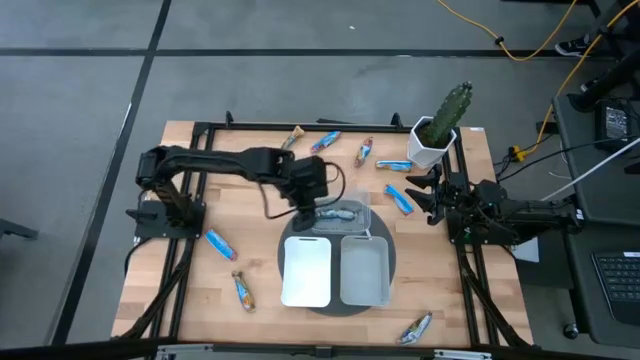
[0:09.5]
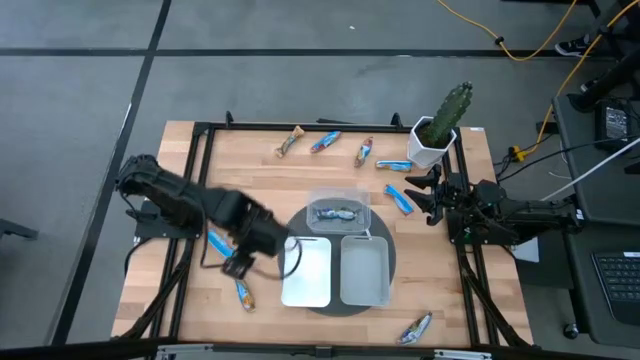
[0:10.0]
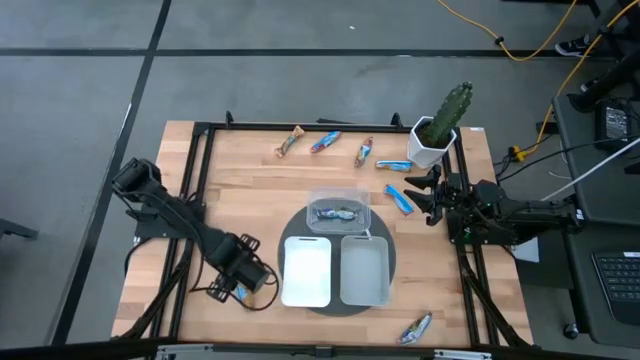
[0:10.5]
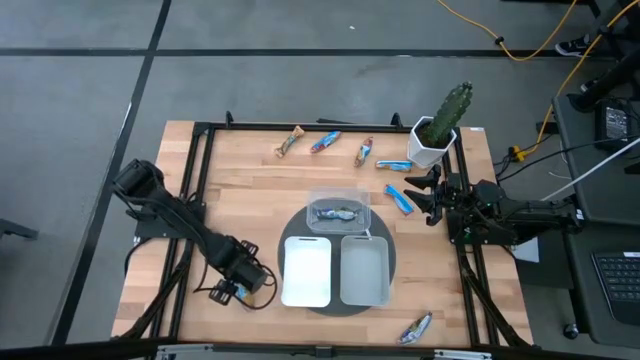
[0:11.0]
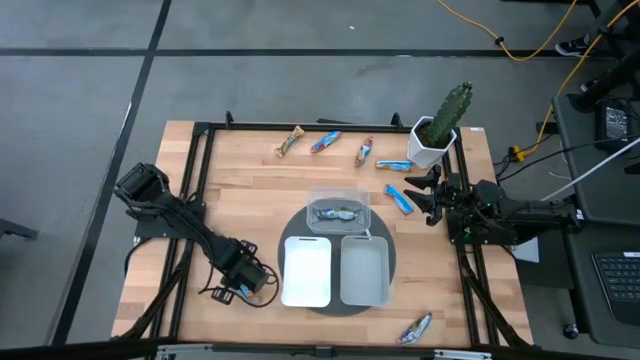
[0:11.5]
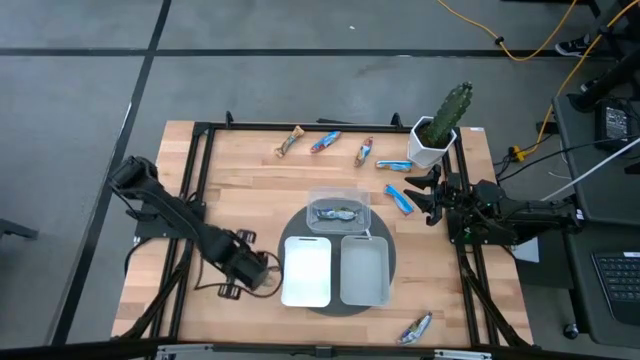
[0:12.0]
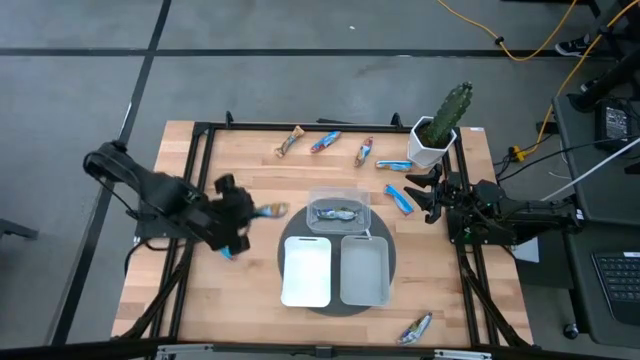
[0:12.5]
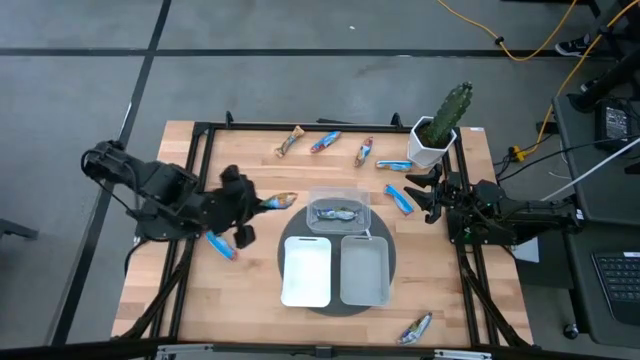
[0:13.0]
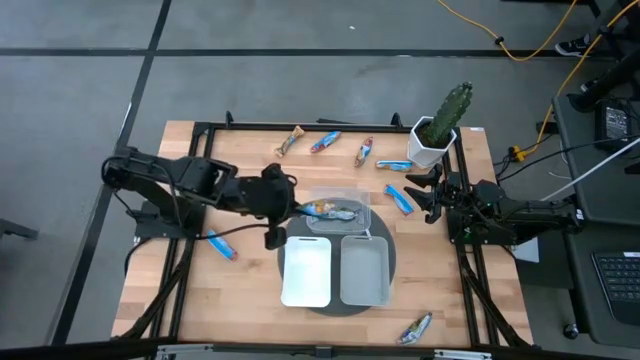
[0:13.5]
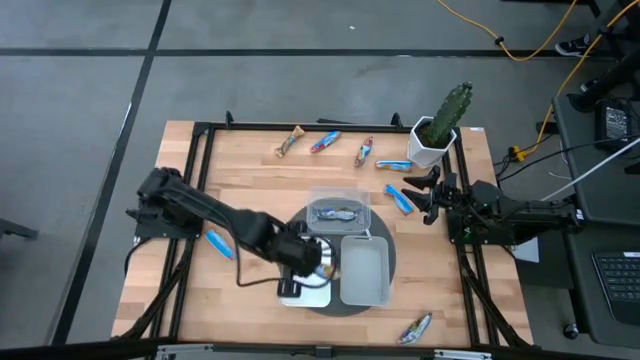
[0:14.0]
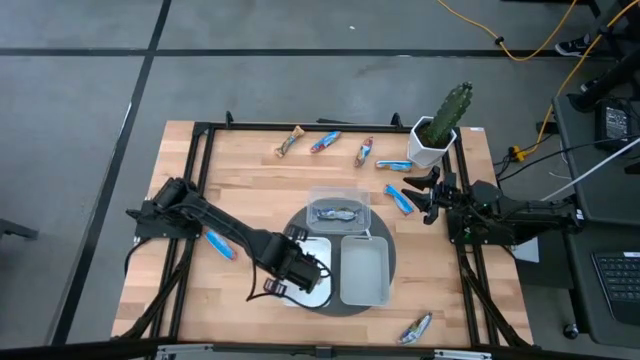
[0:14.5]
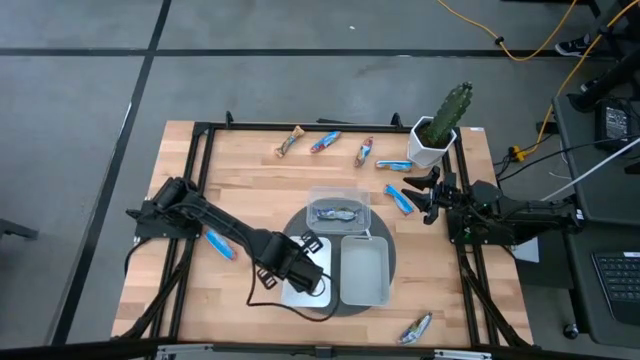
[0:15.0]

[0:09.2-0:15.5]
Task: Pick and place Granola Bars by type
Put the left chocolate chip into the white bin

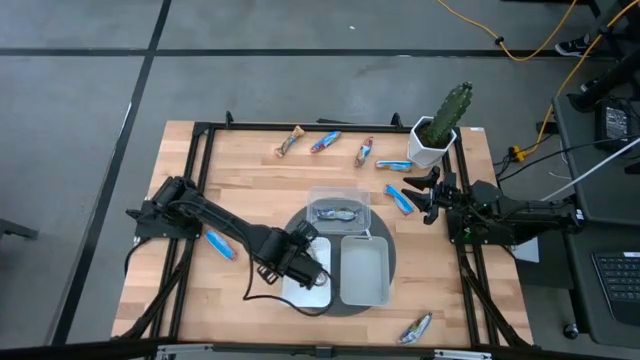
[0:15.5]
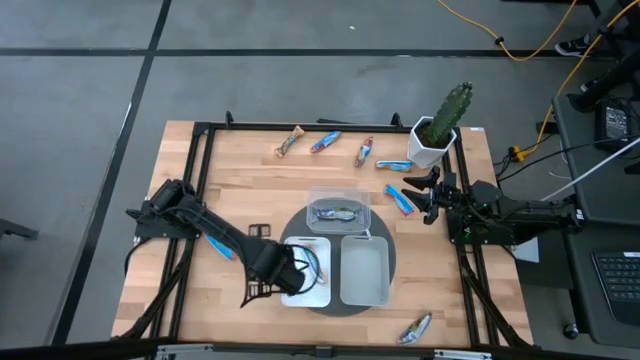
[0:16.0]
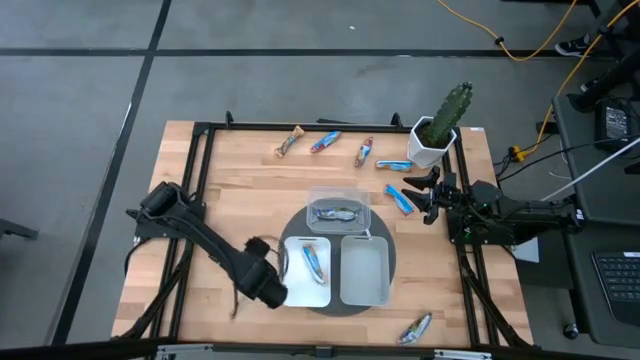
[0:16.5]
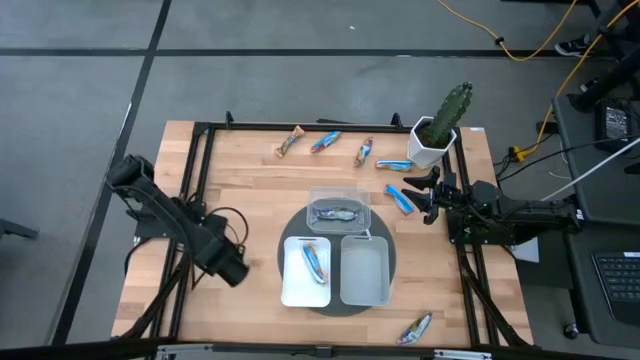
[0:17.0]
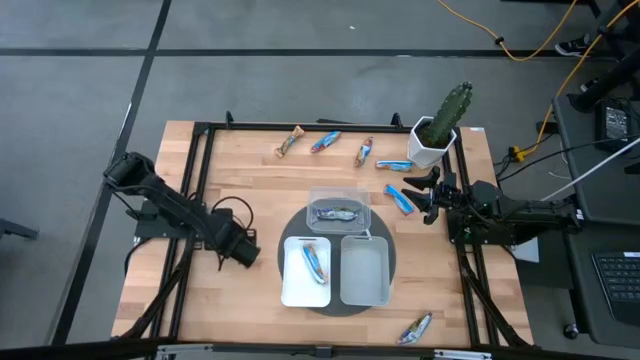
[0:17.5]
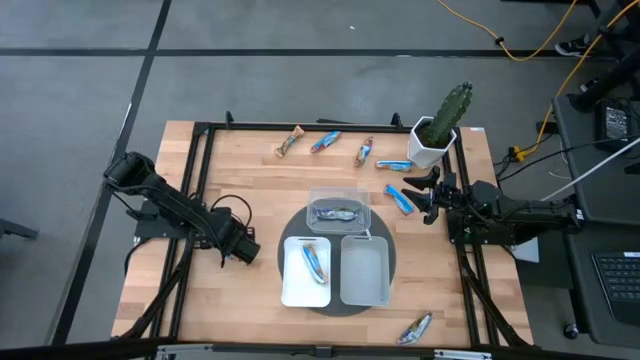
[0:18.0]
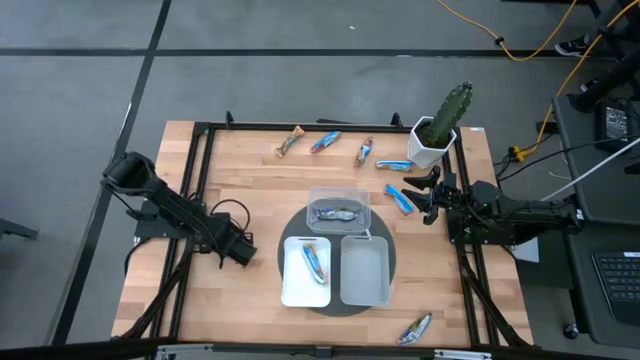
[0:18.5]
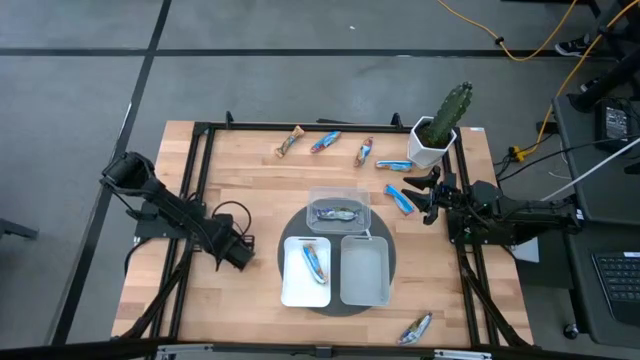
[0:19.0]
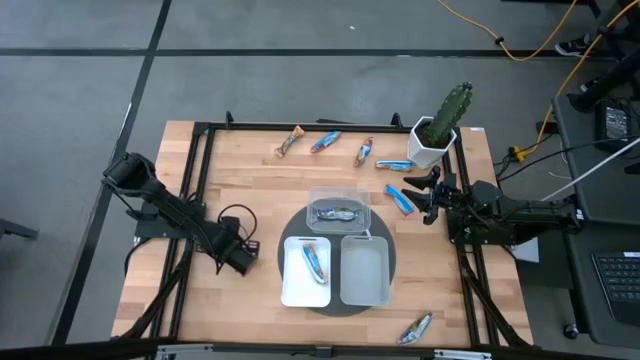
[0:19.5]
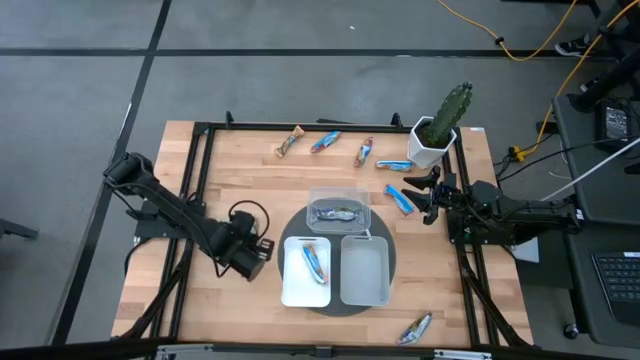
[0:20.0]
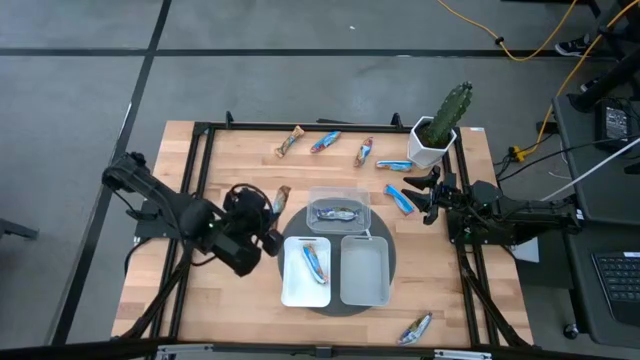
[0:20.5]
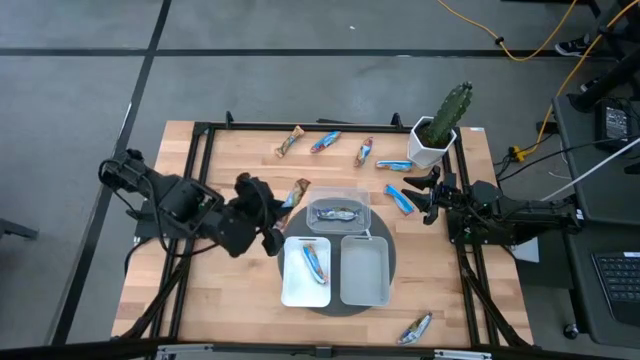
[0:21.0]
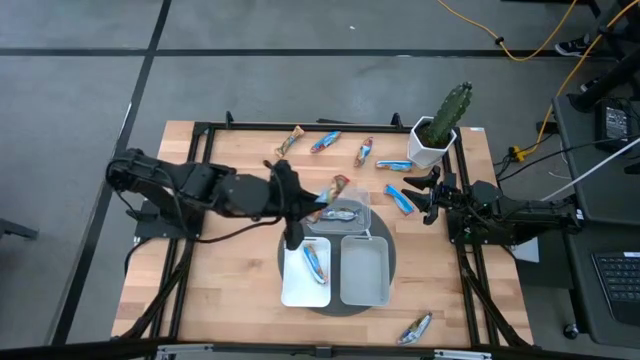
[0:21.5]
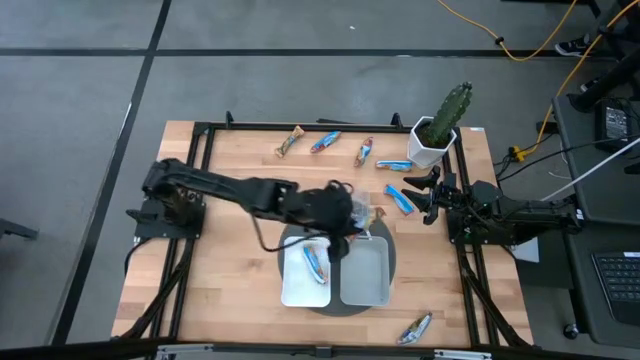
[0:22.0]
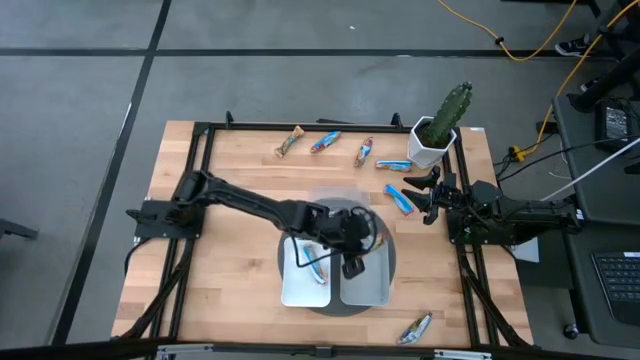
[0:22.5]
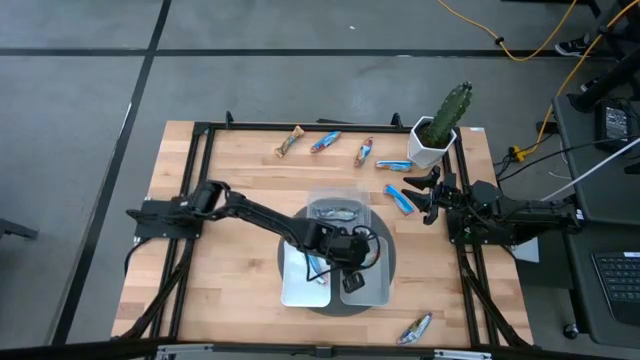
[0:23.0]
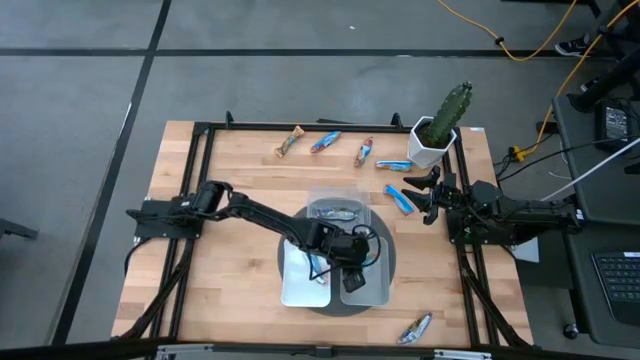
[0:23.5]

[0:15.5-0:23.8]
Put the left red chocolate chip into the gray bin

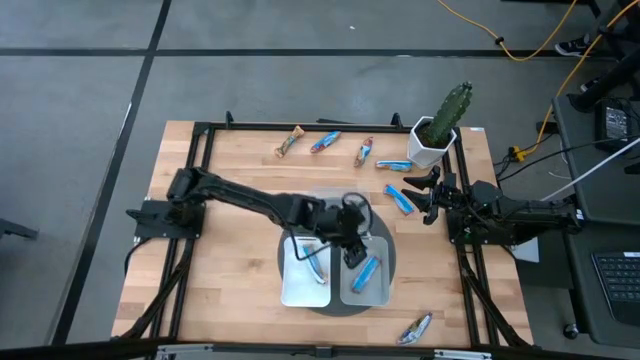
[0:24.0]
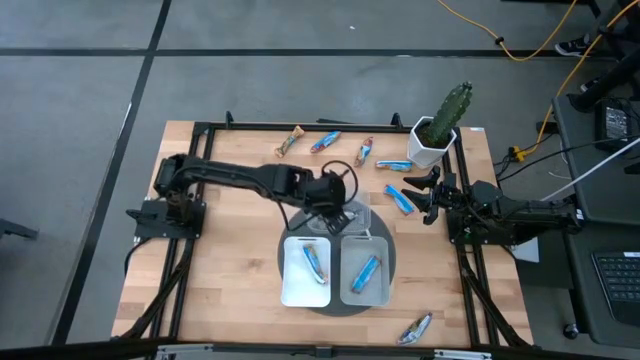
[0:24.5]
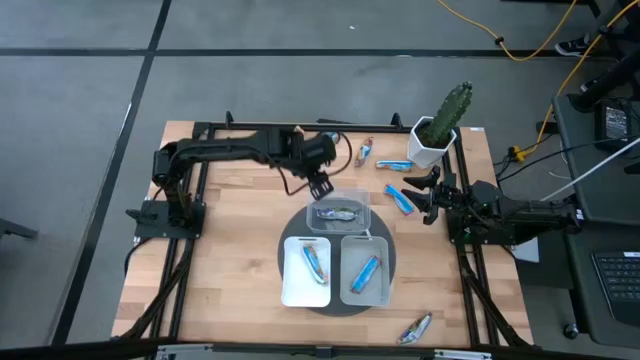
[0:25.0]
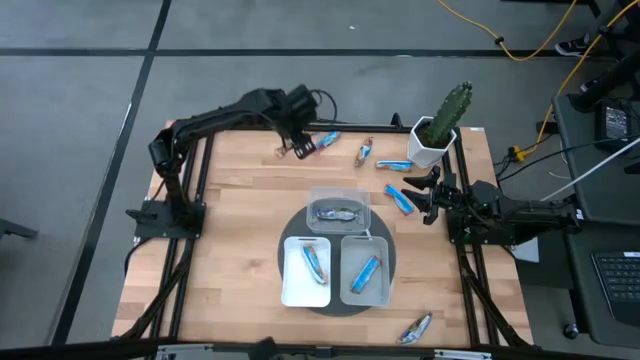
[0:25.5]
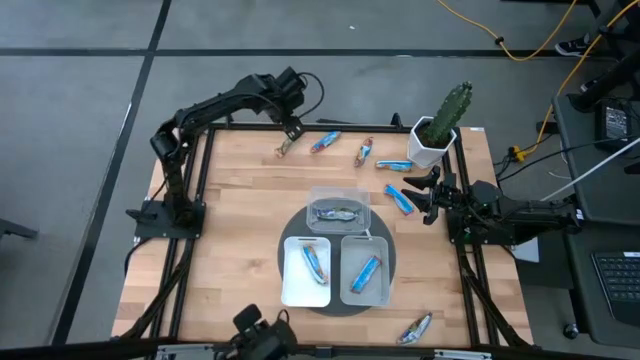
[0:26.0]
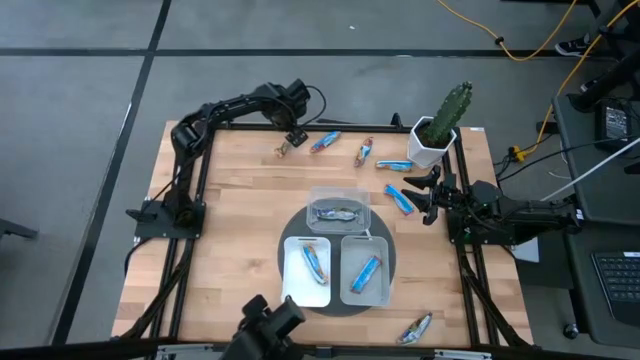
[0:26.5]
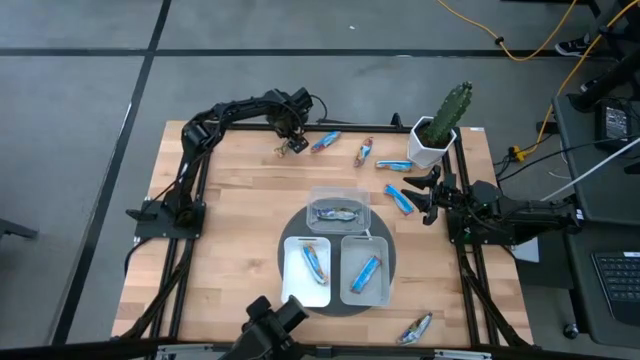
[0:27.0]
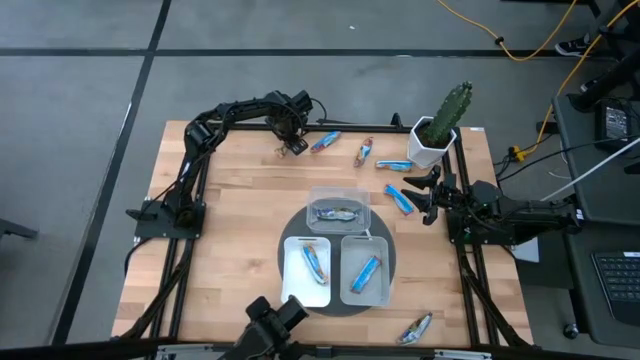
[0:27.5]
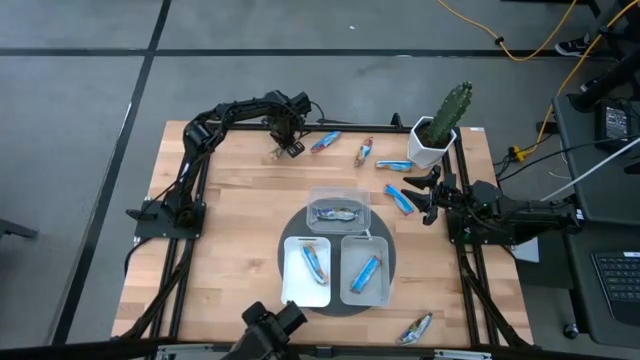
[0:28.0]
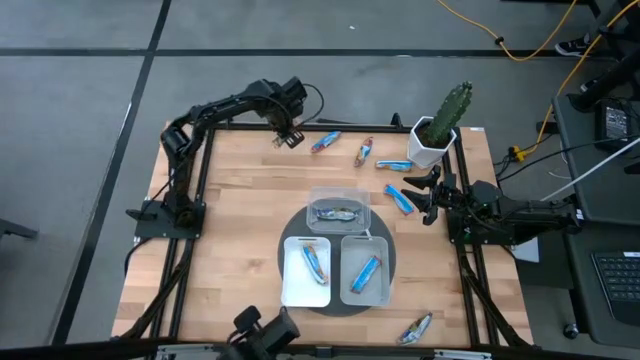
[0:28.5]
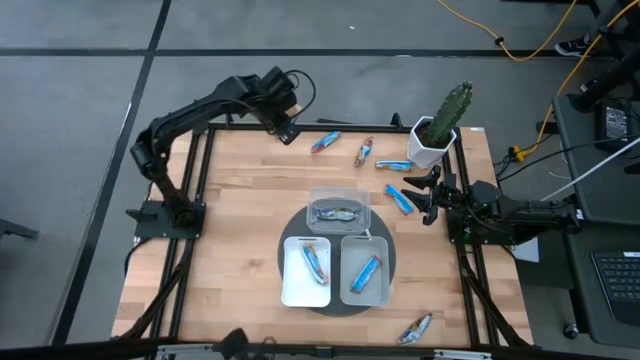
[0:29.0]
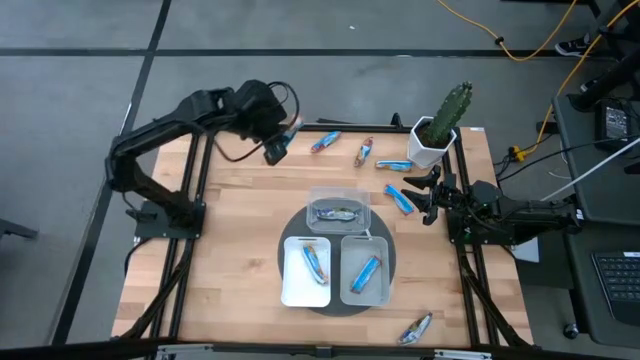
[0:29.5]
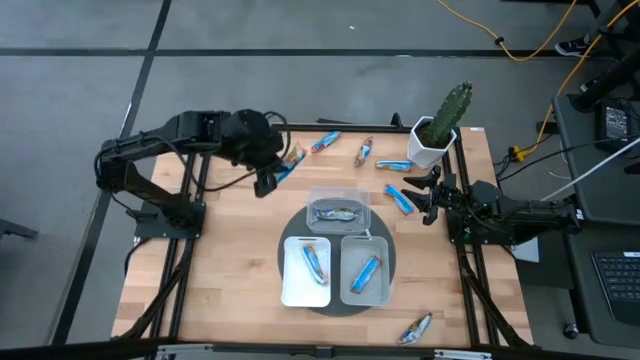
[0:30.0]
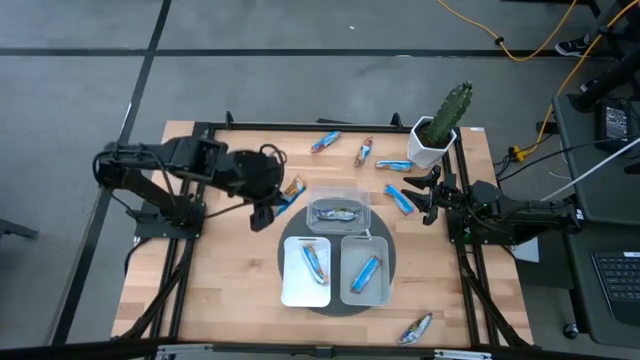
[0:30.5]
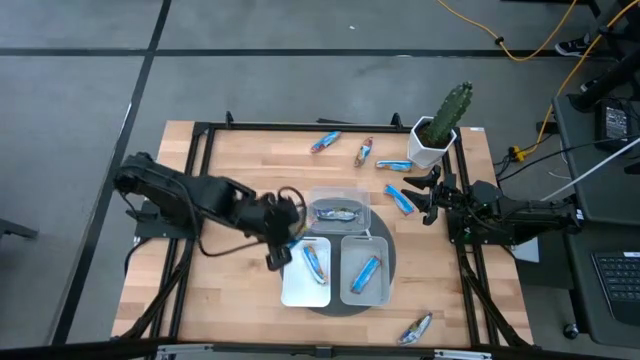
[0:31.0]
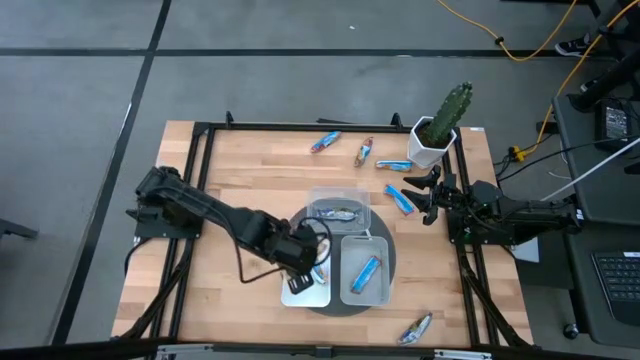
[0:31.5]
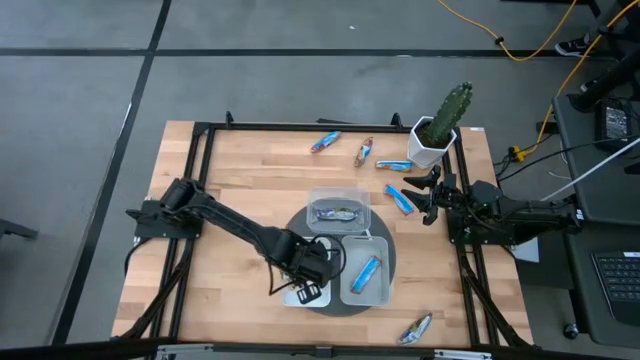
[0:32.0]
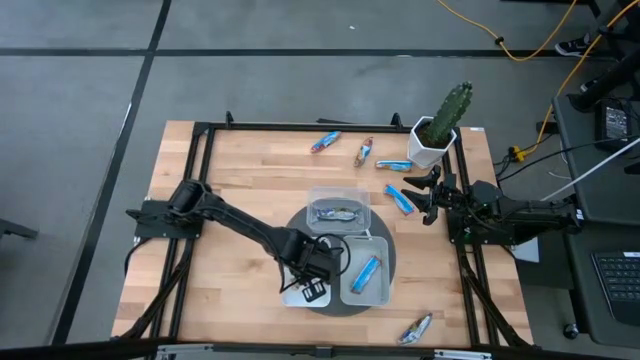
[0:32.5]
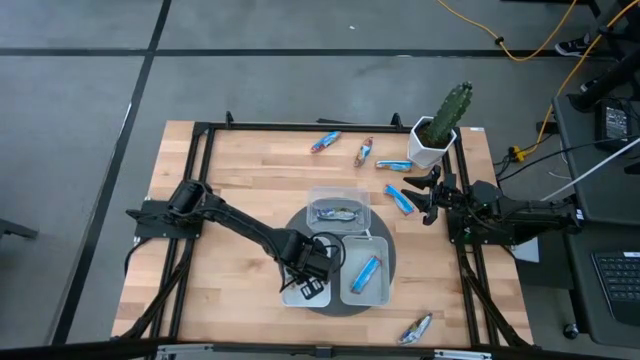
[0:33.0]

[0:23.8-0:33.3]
Put the orange chocolate chip into the transparent bin
